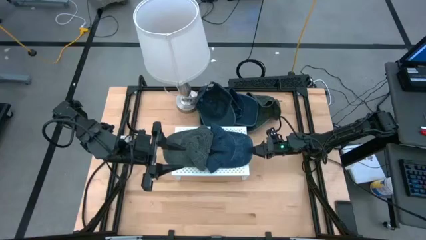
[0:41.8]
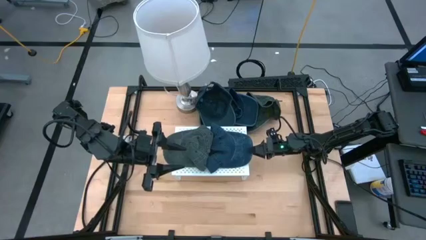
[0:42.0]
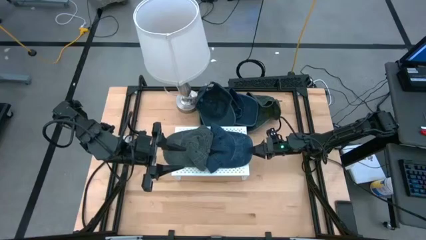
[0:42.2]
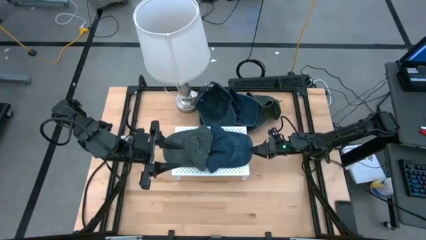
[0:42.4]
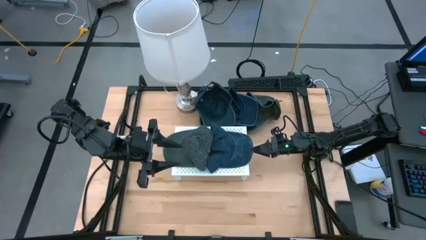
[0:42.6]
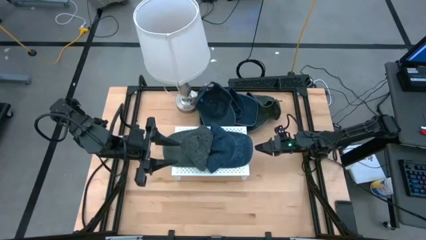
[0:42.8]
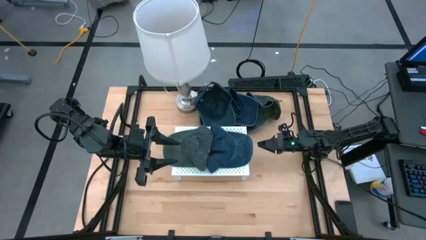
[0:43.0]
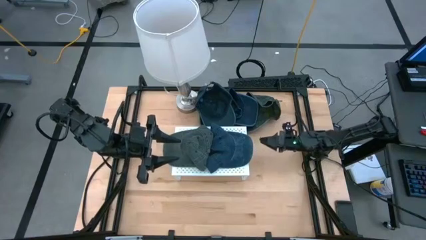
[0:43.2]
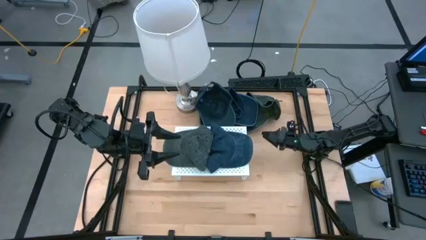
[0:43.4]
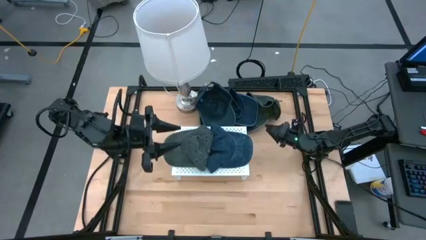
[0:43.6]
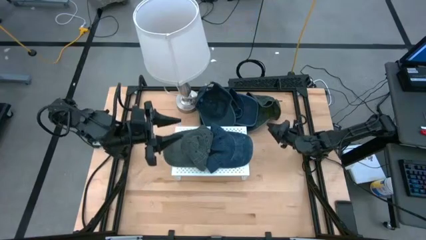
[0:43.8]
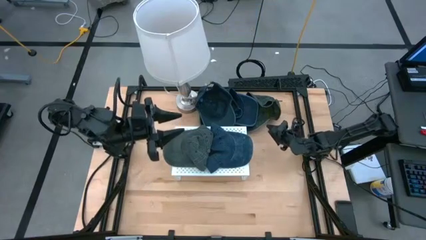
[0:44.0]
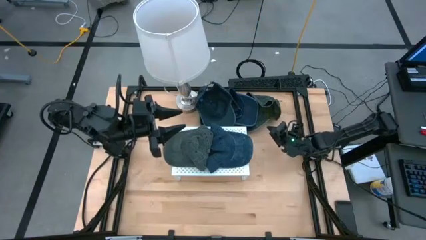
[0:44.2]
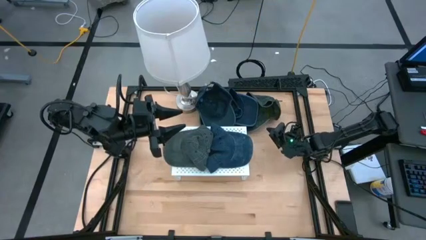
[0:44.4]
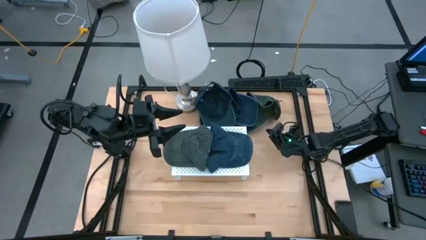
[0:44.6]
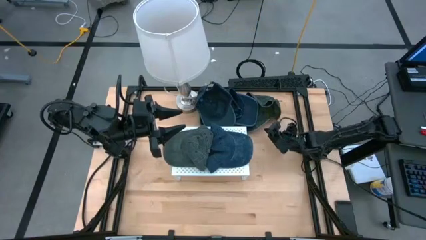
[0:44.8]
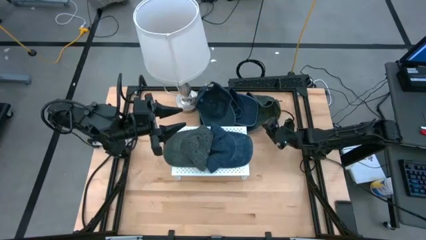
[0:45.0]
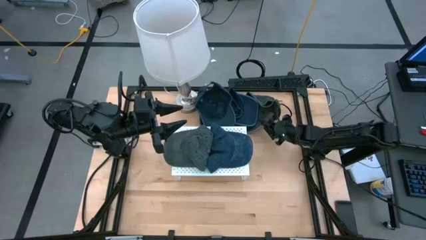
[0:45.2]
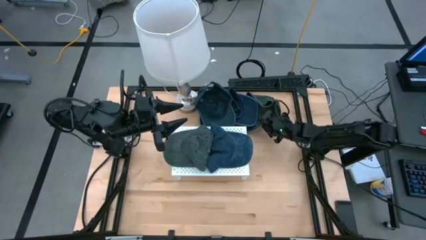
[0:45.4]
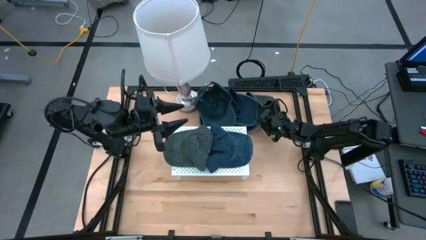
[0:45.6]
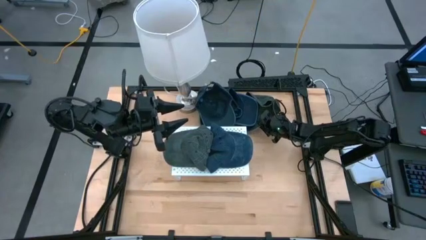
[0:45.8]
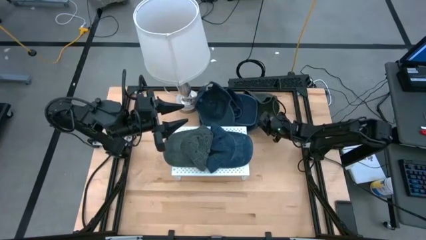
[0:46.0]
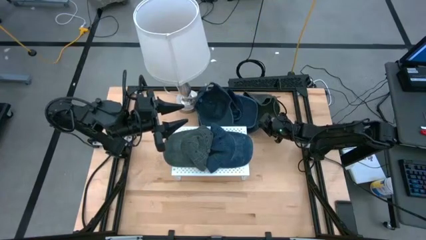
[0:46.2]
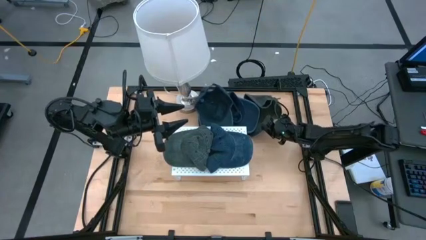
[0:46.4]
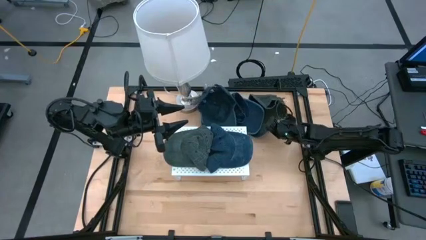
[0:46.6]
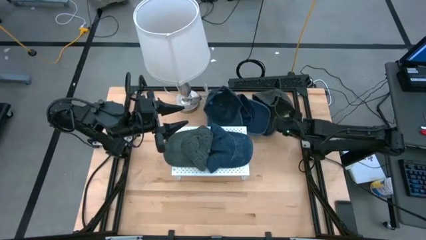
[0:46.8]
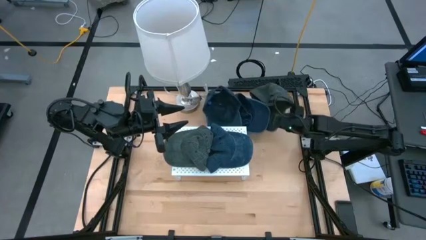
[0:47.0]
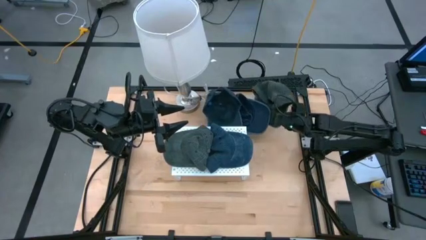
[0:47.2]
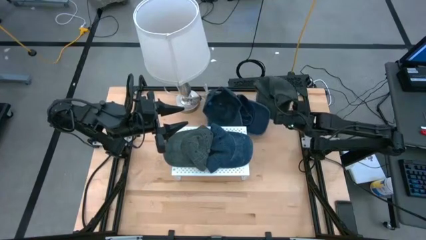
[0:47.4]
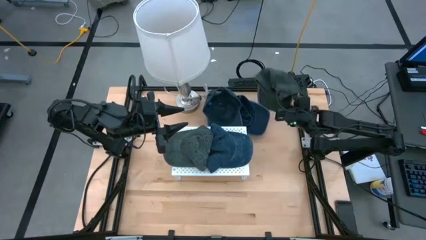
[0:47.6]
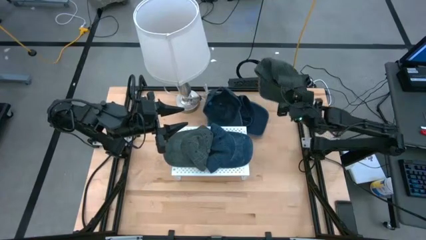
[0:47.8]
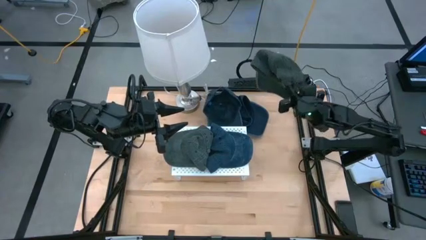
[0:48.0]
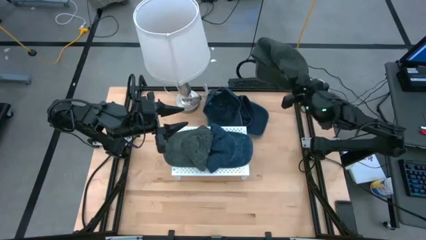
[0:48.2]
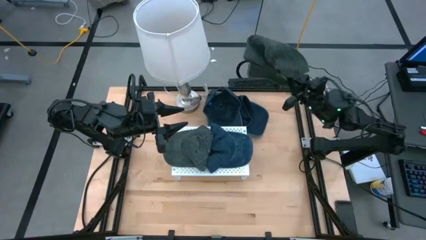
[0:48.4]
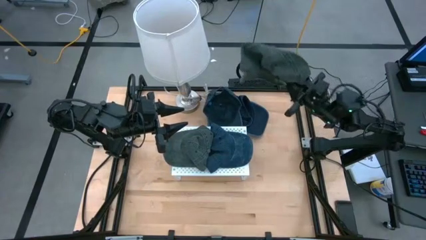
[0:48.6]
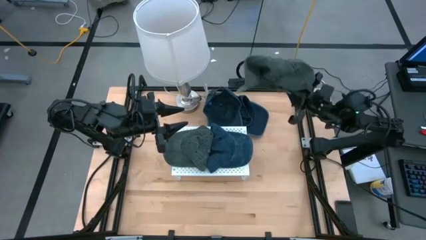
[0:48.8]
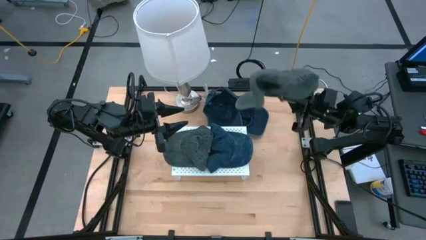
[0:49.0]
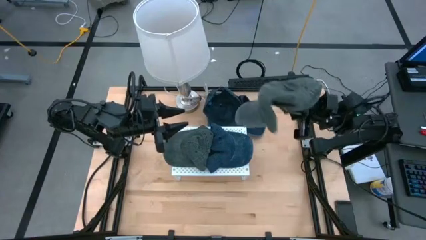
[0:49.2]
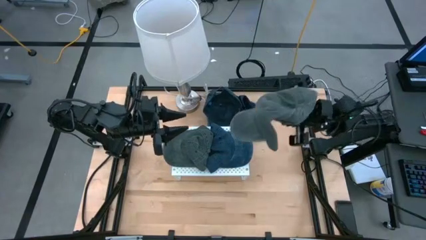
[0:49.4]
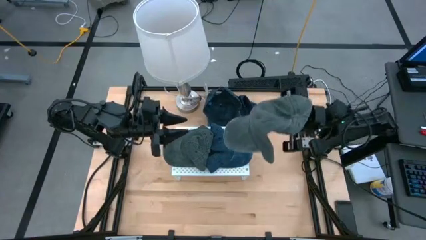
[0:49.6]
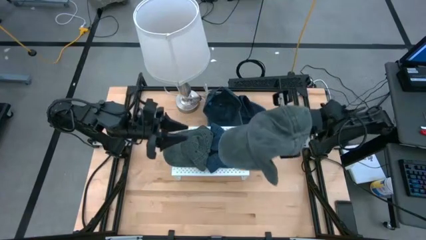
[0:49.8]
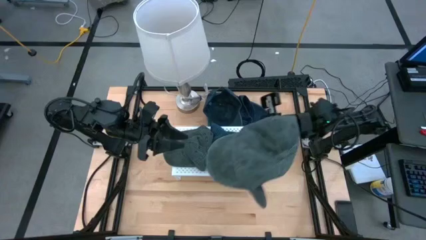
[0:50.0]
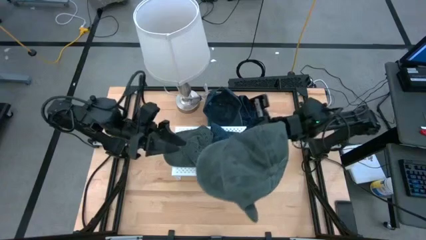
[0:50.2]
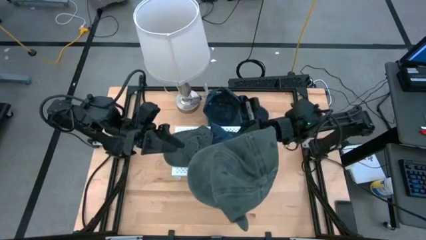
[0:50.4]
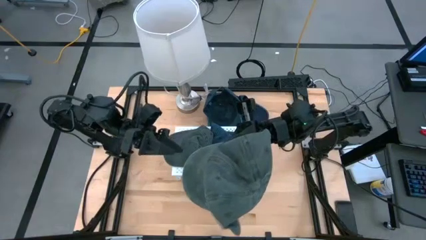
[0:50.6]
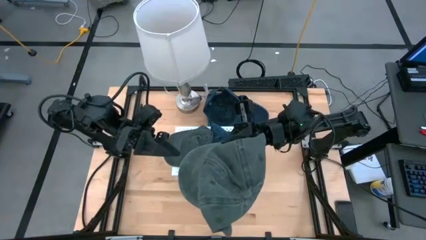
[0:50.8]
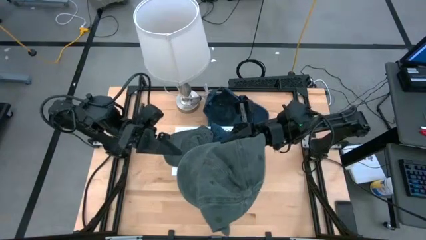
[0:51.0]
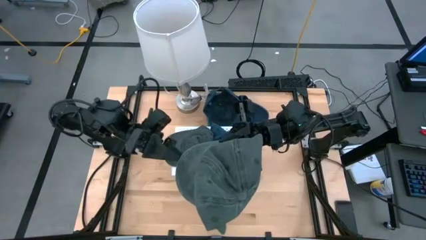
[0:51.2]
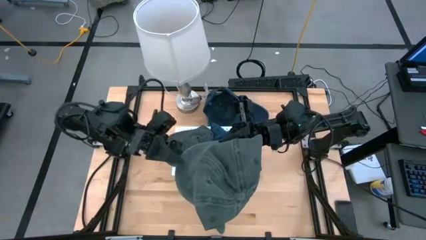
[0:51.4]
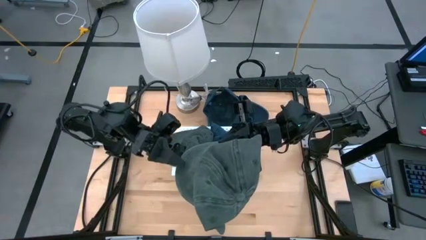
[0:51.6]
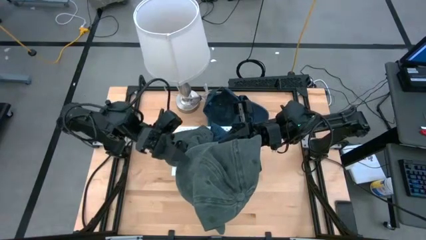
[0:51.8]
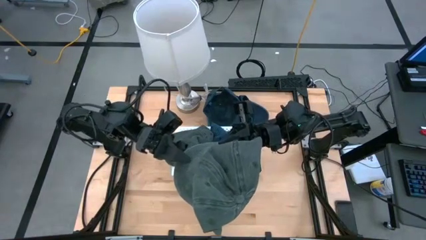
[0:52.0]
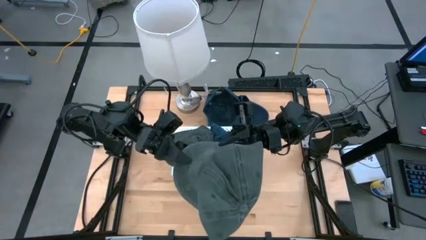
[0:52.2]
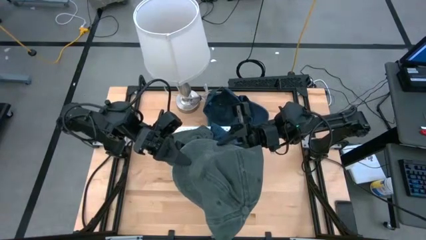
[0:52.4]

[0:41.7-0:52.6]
Task: Pick & Place hat
Stack the right black cap on top of the other black cap on the shelf

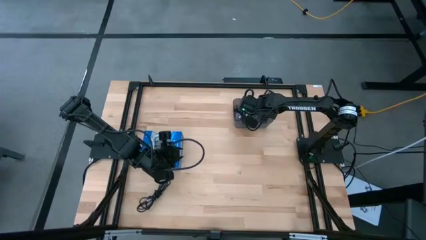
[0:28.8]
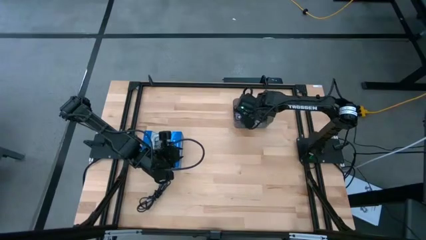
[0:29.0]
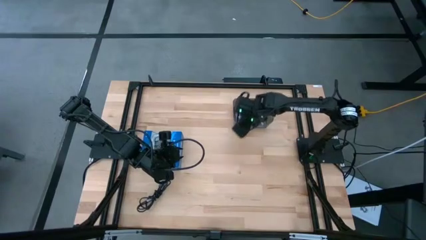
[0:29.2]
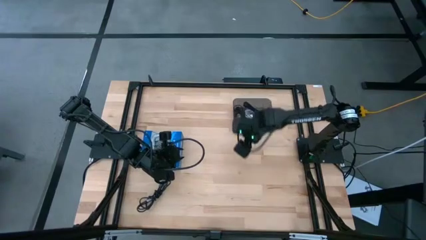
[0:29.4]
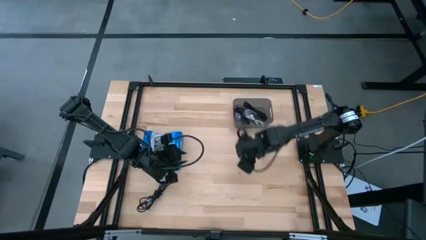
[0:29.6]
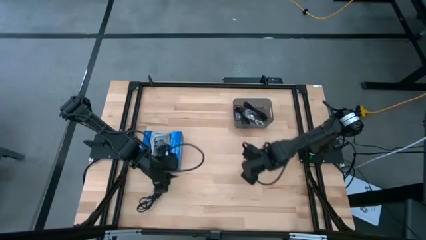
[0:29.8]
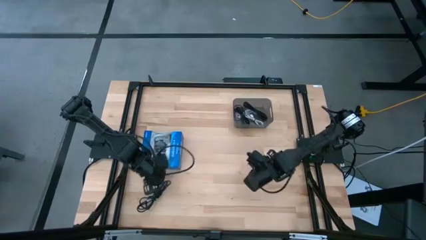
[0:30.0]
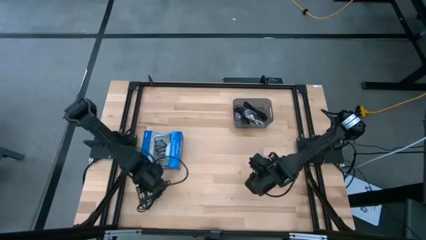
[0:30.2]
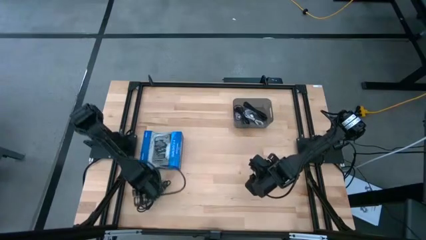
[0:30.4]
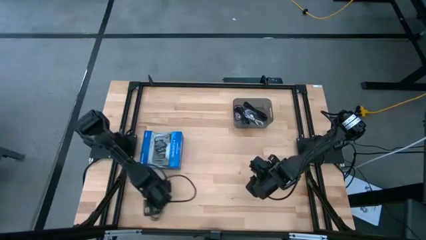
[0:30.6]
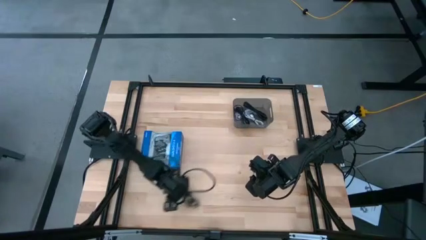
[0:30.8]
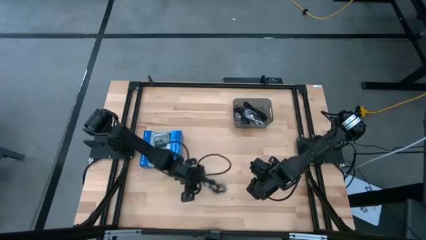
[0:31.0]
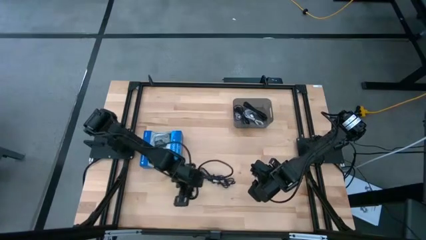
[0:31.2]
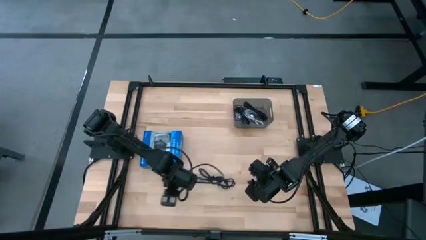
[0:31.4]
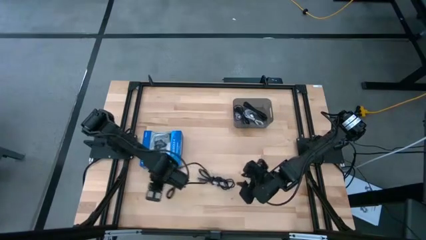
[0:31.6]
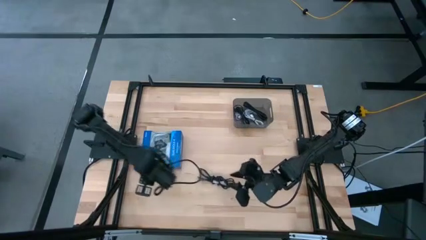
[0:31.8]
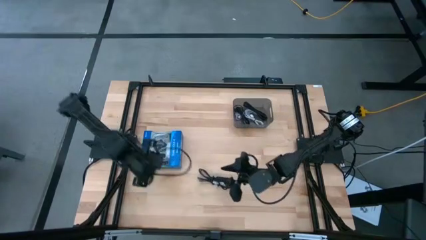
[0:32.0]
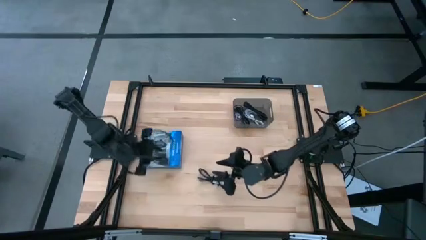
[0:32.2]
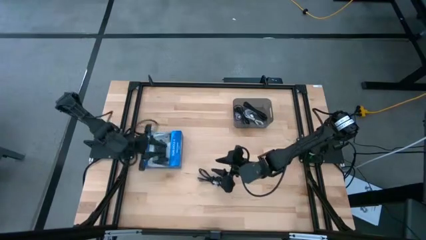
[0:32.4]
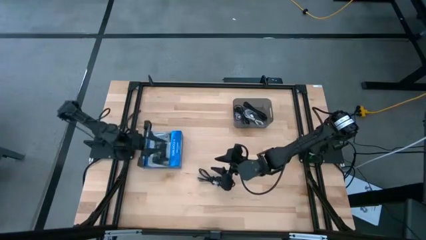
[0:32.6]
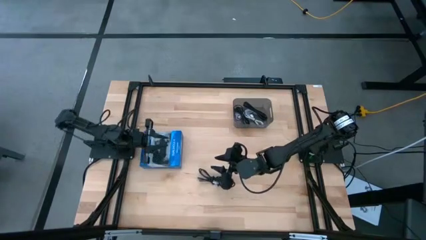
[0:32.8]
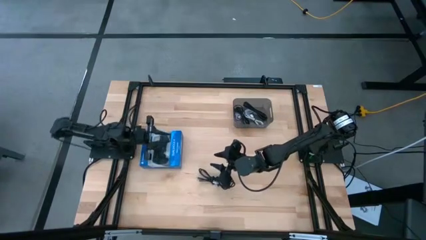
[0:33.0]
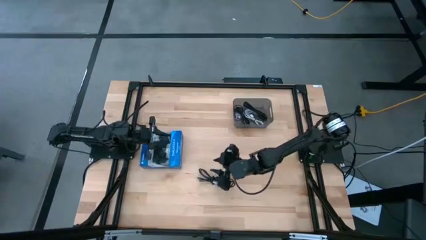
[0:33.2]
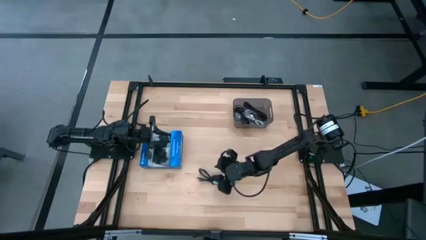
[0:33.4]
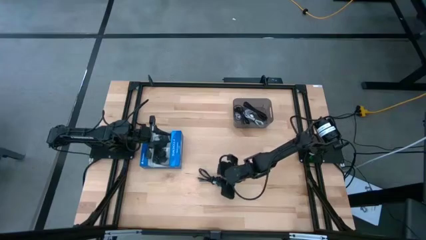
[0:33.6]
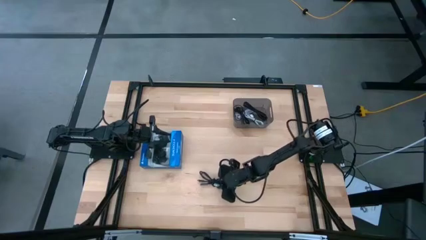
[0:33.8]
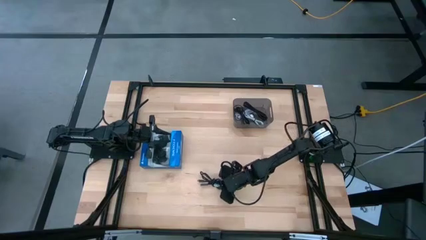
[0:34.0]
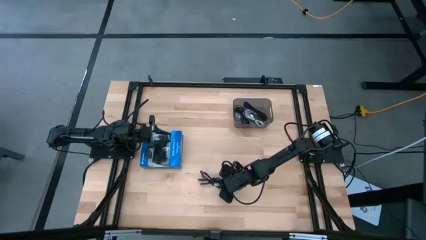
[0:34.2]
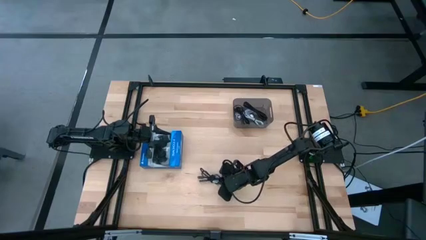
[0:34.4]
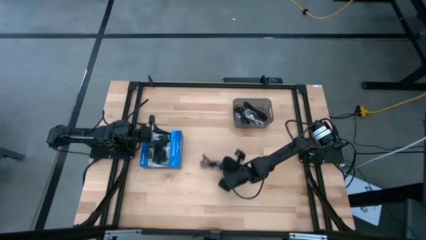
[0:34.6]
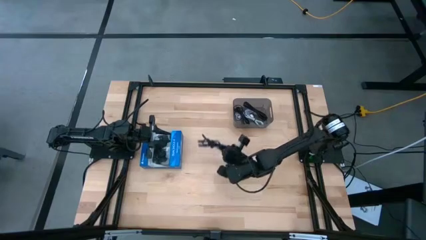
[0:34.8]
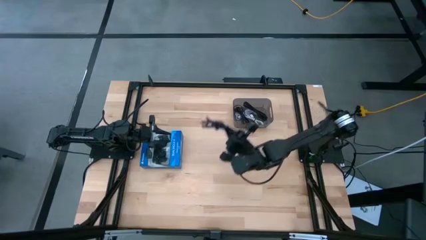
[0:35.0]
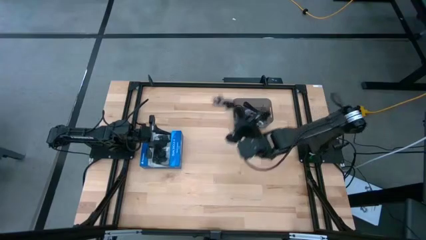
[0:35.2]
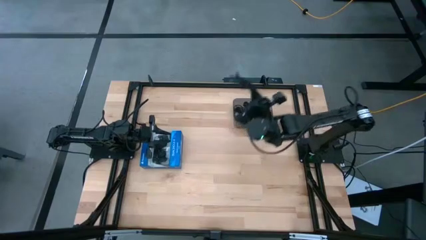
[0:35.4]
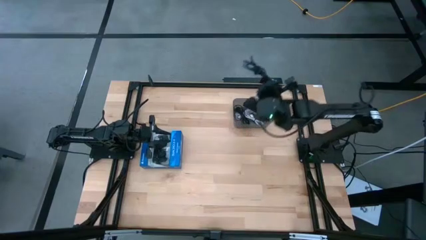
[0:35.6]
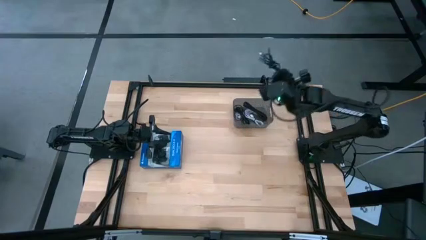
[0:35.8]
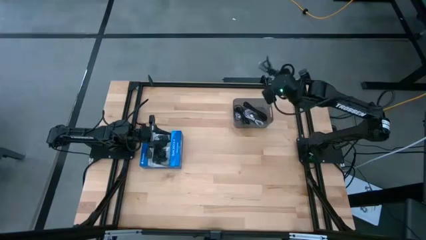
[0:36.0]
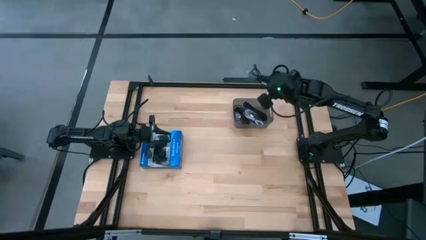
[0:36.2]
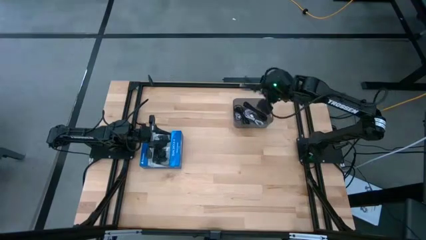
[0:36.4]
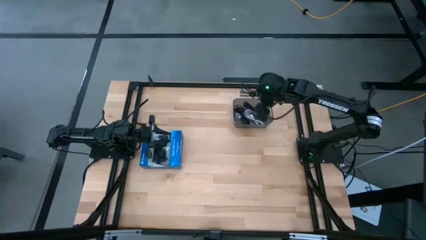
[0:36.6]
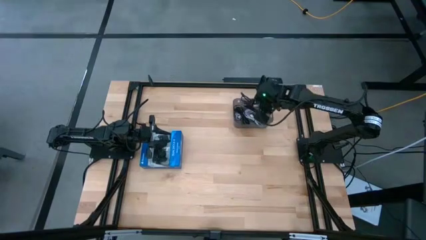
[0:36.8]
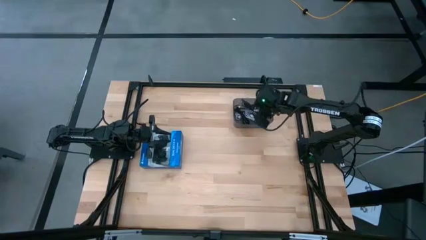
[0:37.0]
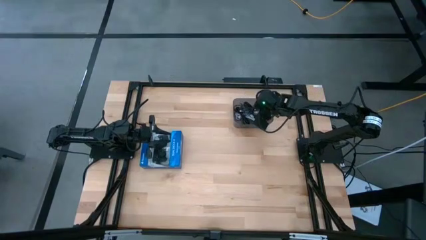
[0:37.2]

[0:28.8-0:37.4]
Task: Pick and place USB-C Cables
Put the black charger cable into the black bin
